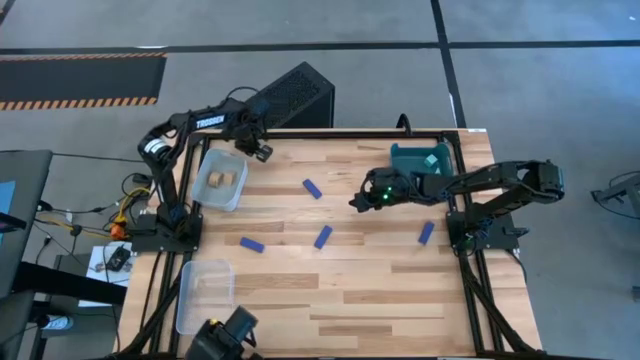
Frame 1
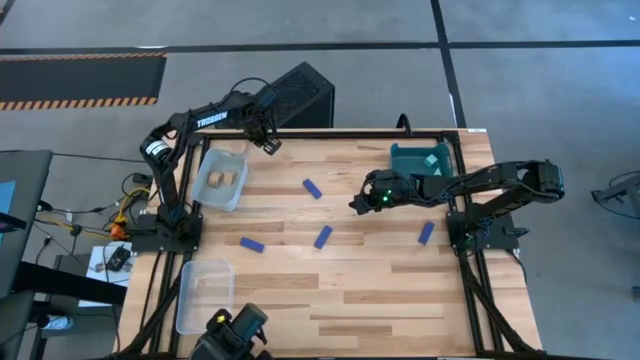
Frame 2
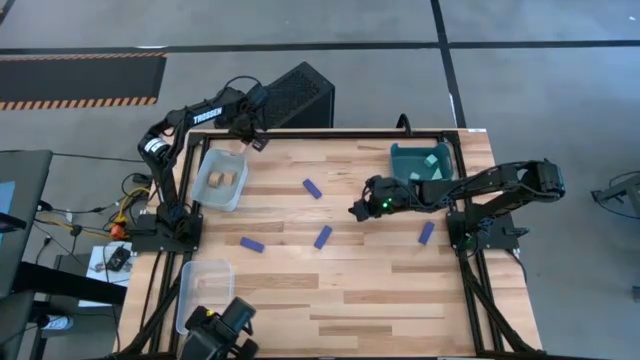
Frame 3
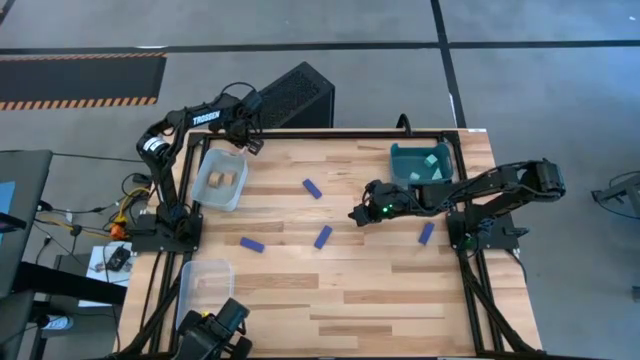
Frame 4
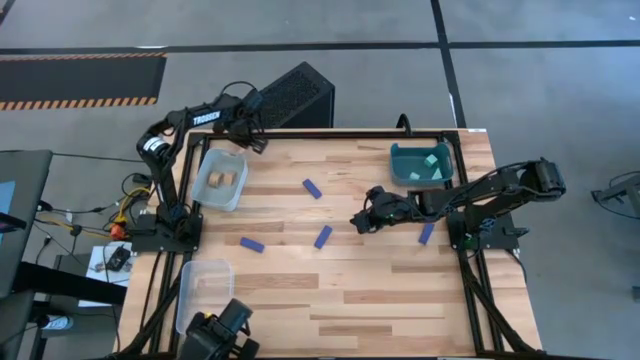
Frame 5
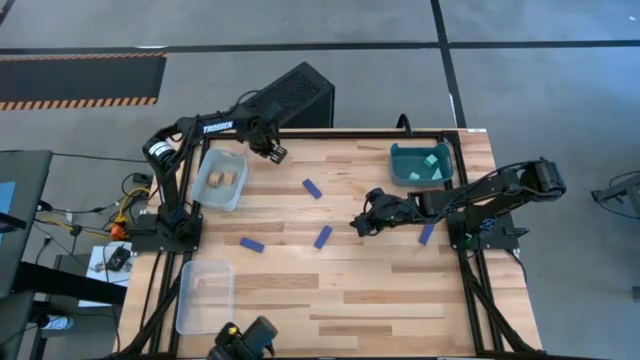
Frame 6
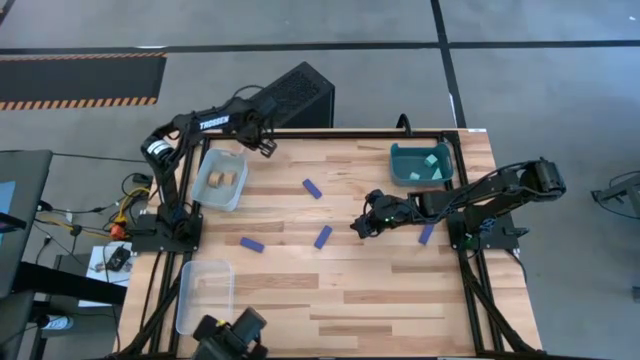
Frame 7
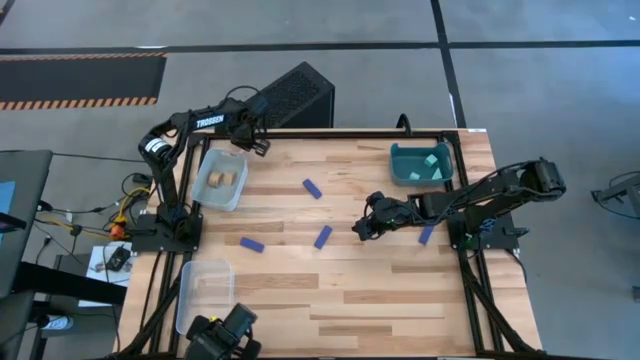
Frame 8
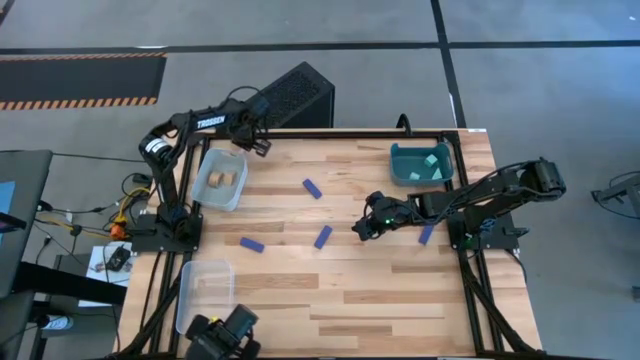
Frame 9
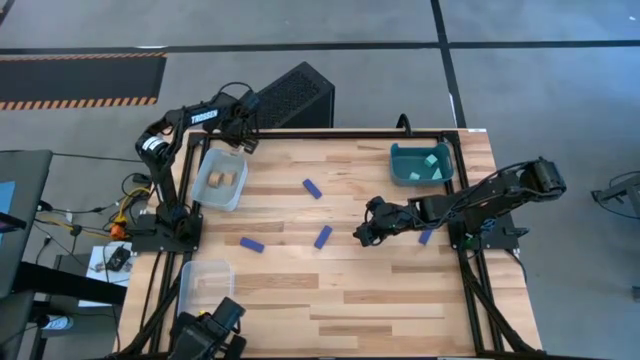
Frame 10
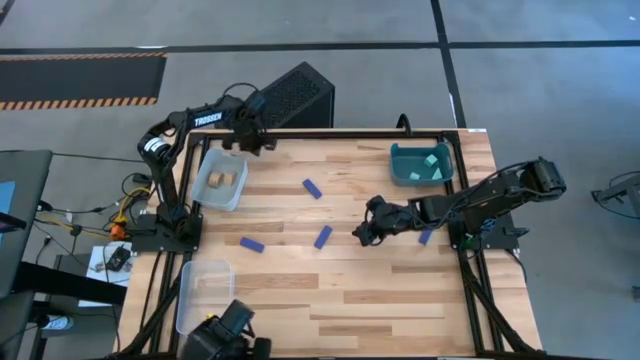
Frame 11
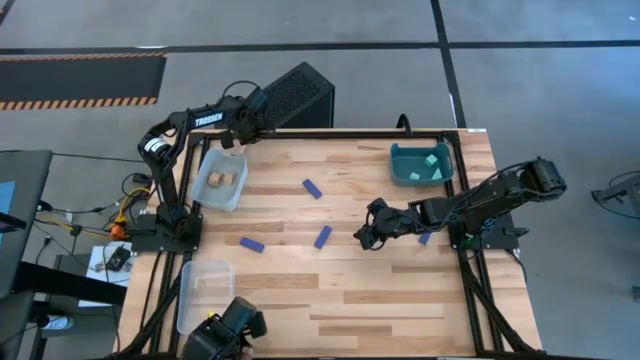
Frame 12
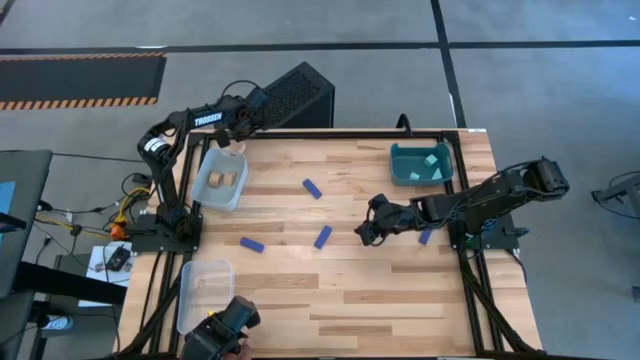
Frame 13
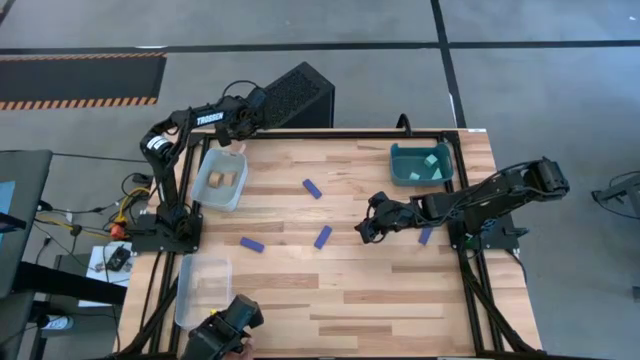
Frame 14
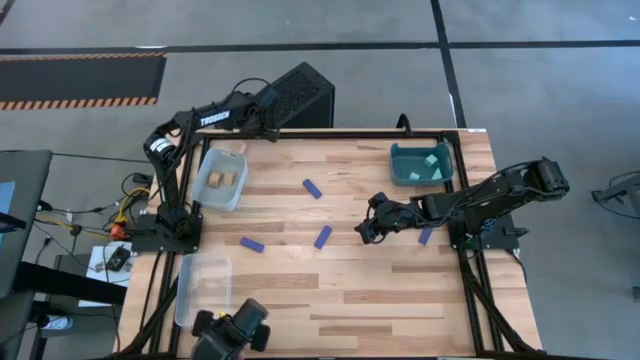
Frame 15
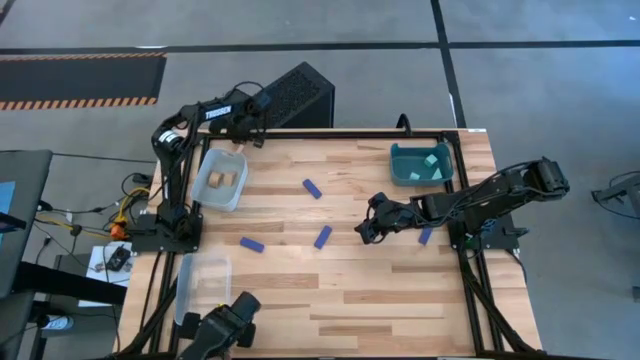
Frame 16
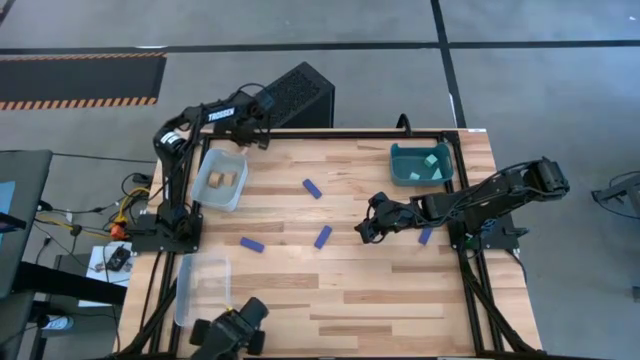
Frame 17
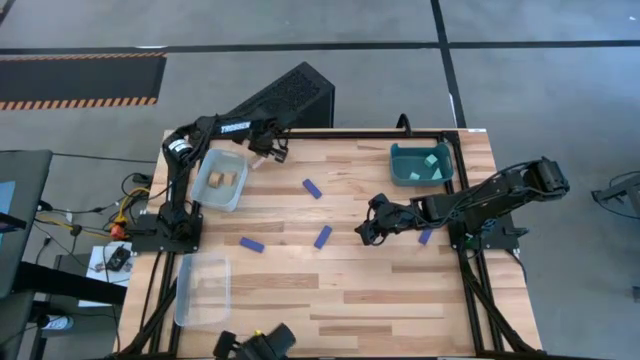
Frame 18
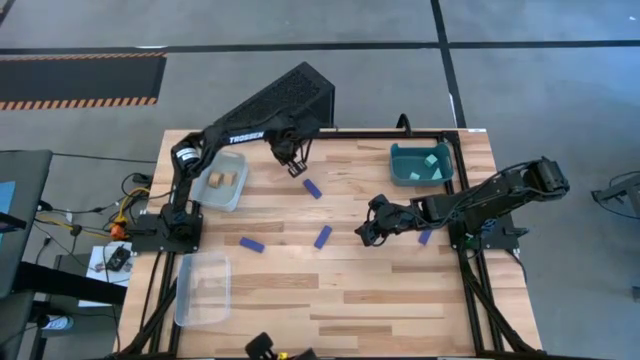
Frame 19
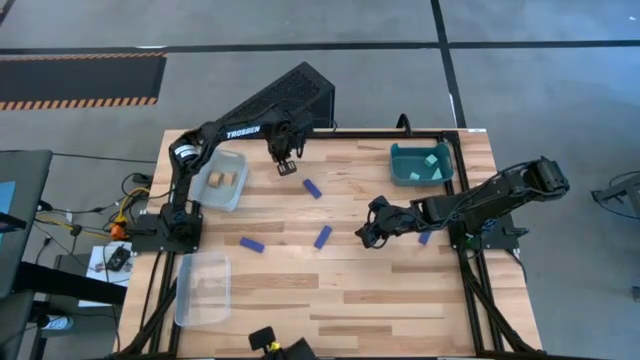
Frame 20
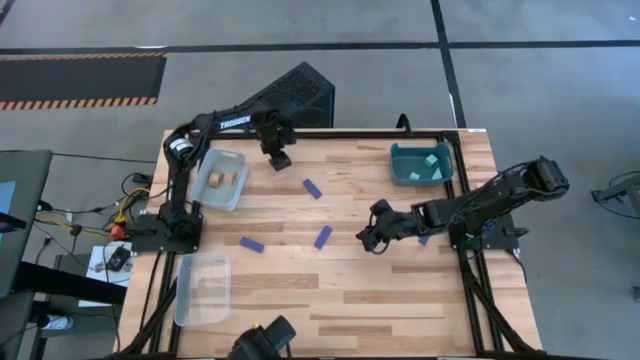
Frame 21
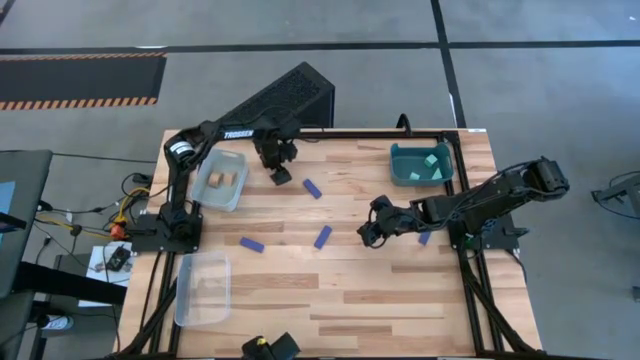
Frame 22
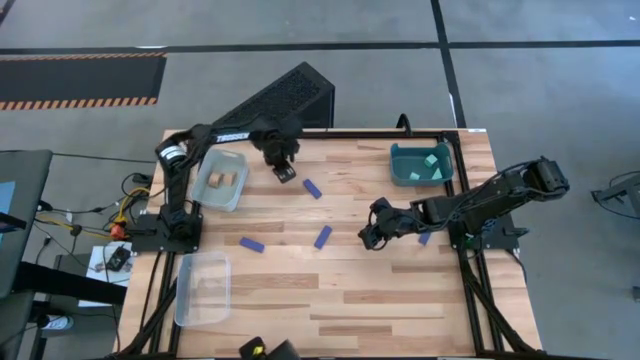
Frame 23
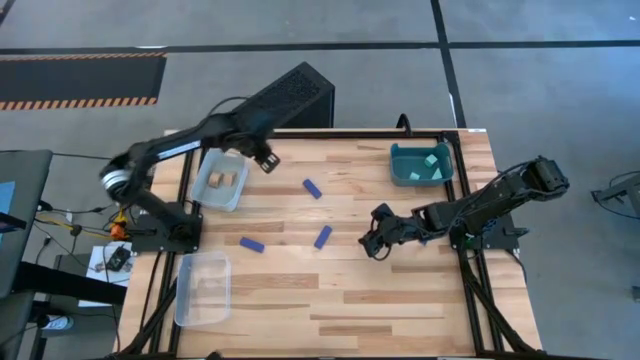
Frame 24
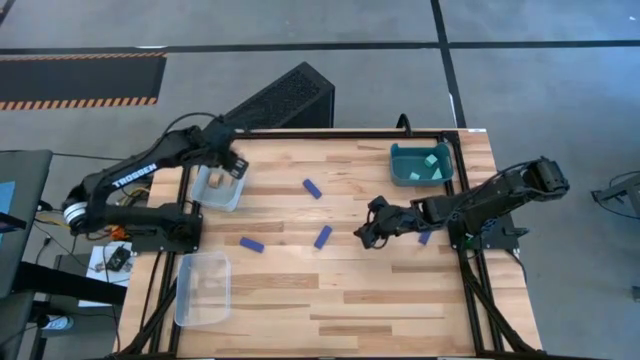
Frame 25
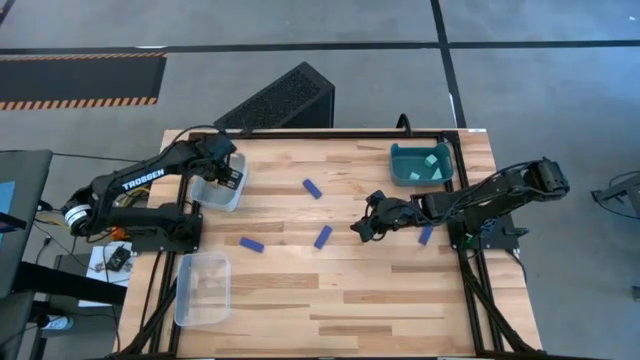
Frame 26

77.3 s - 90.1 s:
Task: Sort & place blocks by color
Put the light brown block into the white bin

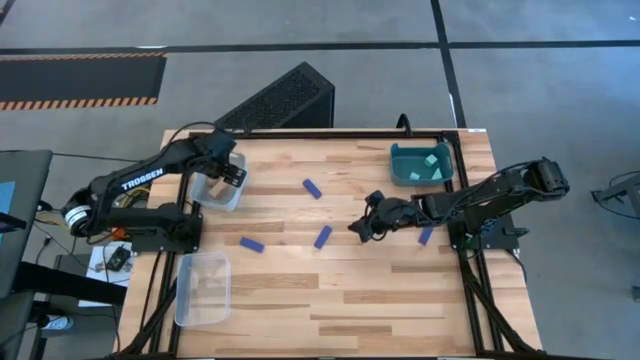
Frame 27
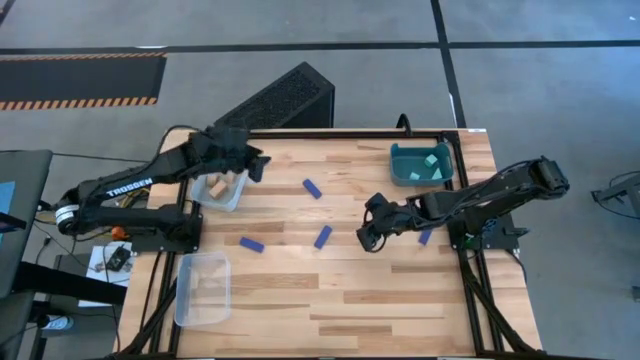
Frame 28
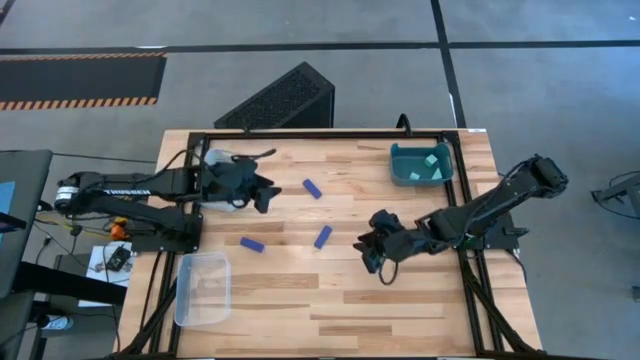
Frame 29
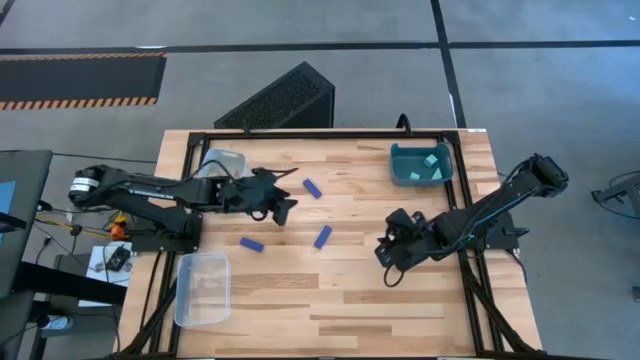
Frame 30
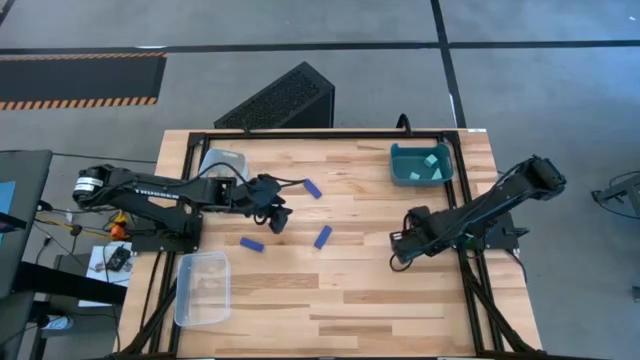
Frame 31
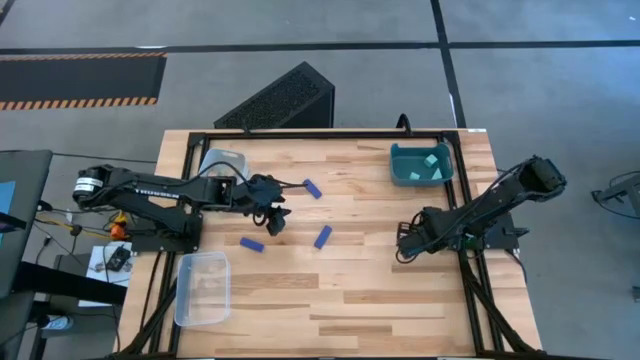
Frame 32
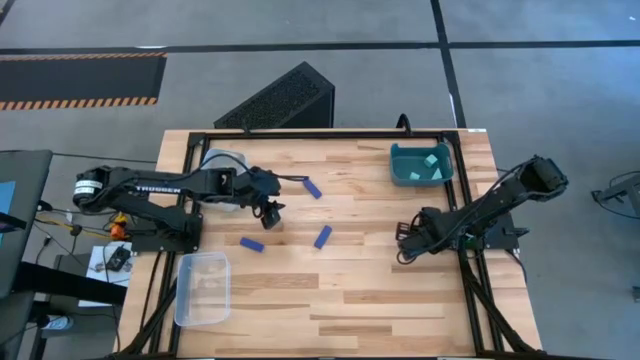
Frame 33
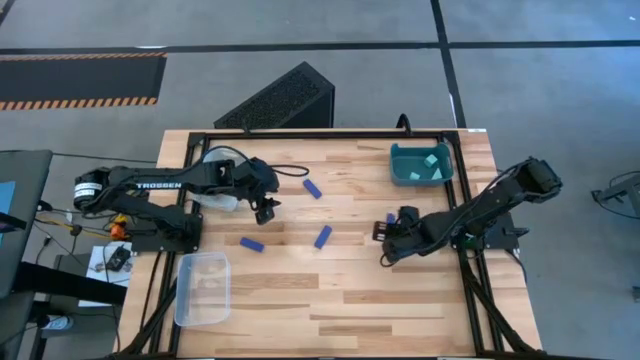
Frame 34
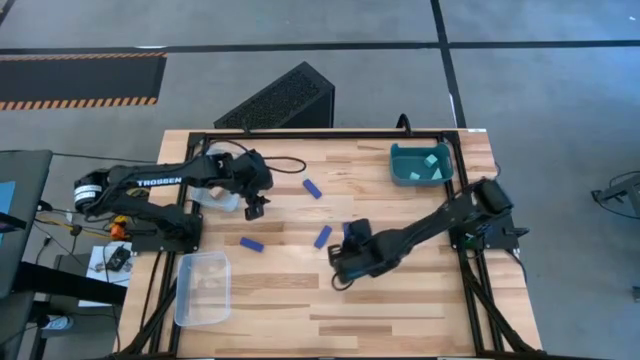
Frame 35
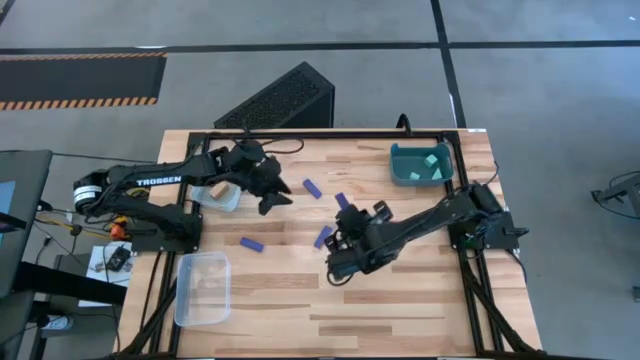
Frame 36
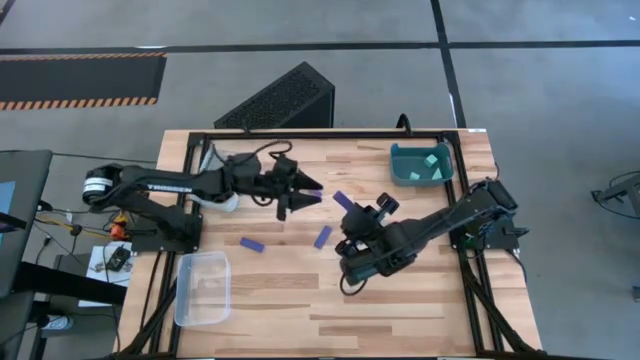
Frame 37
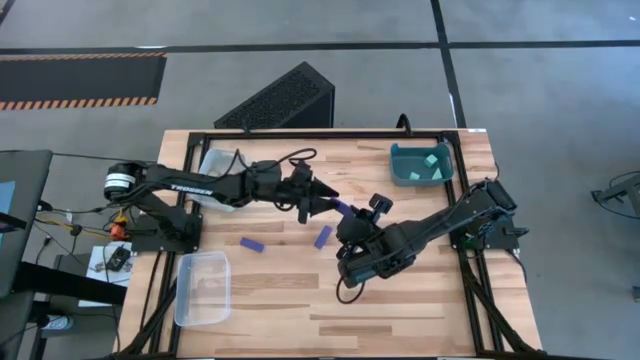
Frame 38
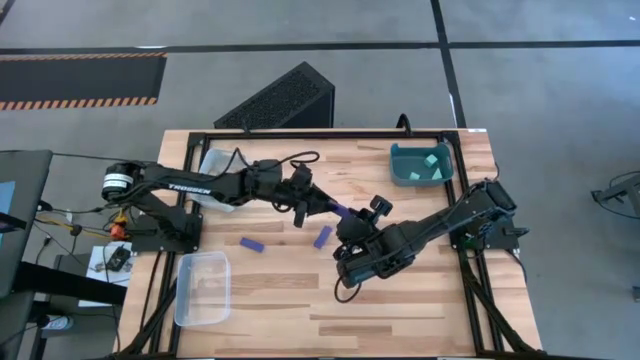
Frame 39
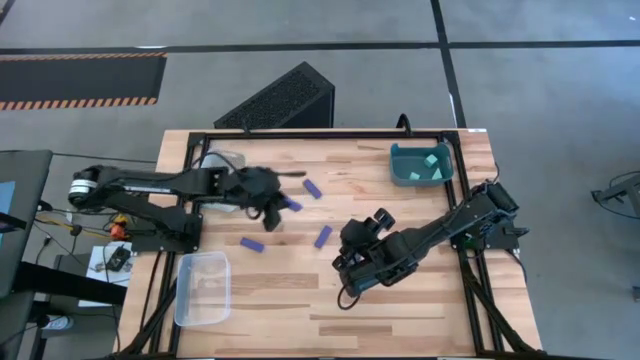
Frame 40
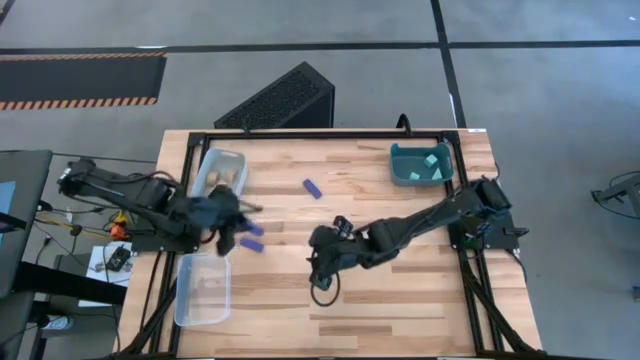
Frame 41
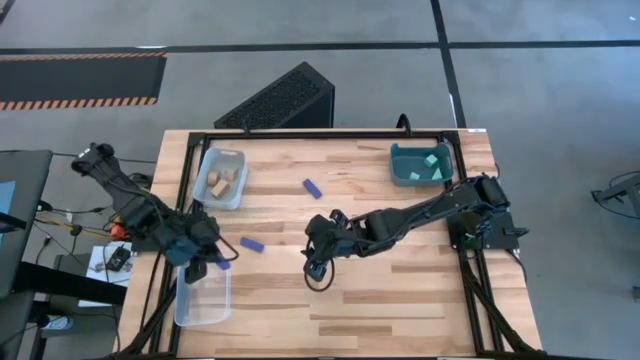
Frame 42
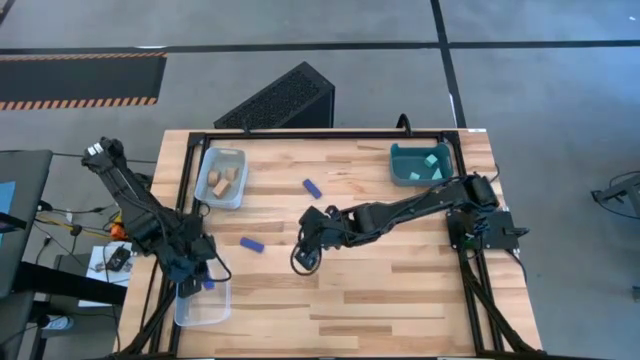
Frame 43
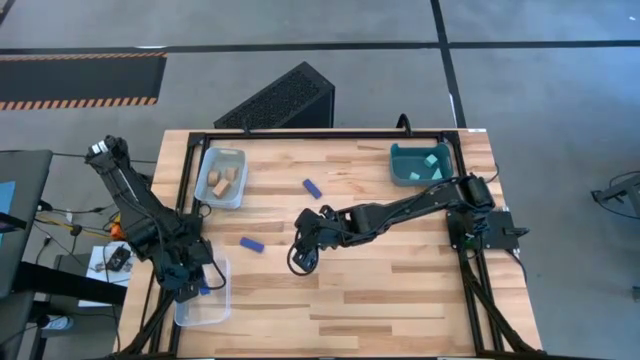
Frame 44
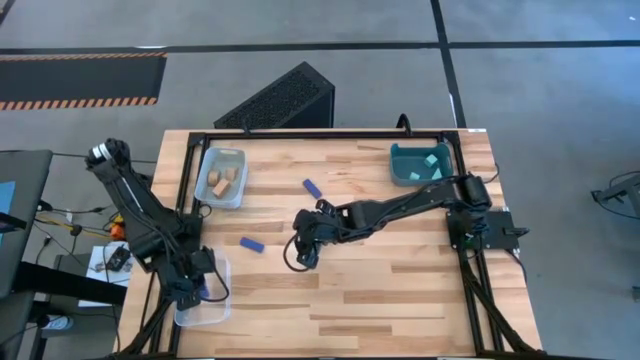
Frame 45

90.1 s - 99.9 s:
Put the blue block into the transparent bin
